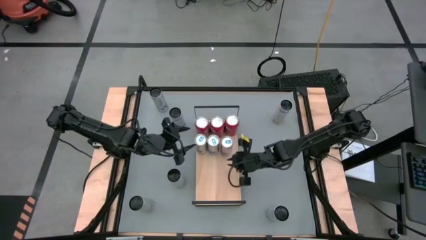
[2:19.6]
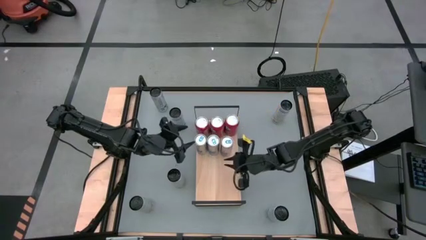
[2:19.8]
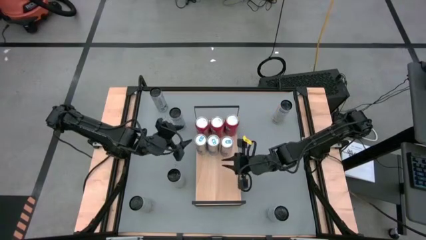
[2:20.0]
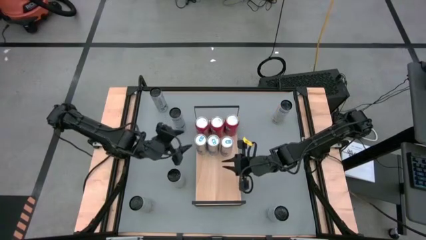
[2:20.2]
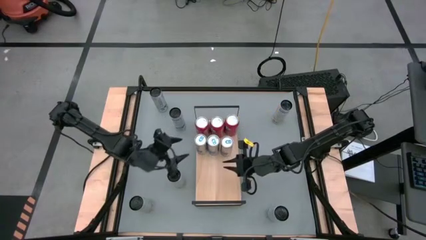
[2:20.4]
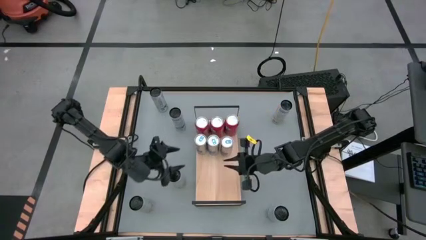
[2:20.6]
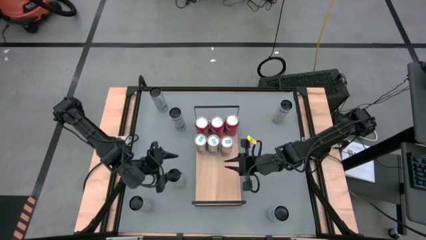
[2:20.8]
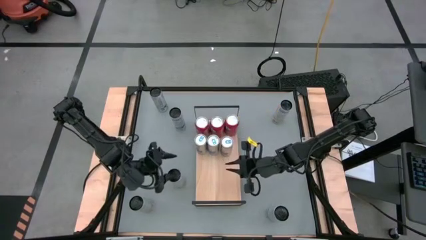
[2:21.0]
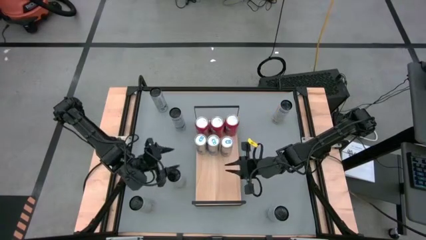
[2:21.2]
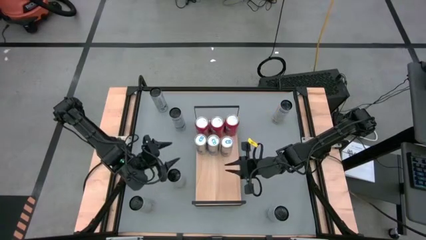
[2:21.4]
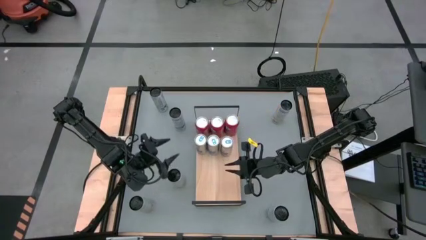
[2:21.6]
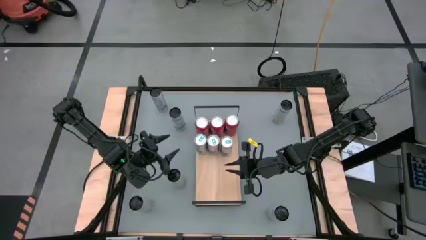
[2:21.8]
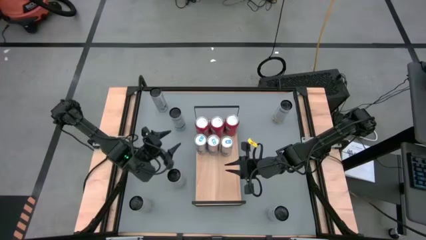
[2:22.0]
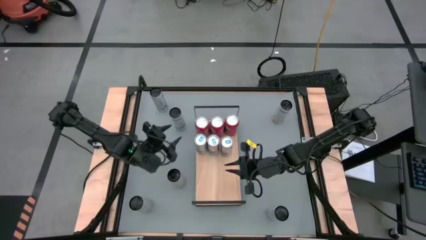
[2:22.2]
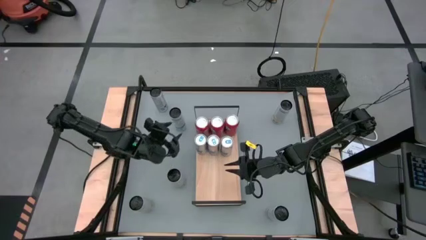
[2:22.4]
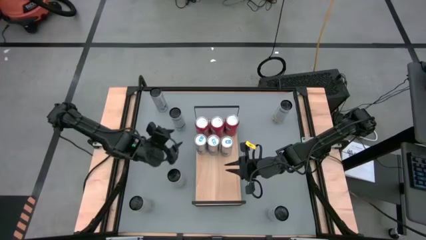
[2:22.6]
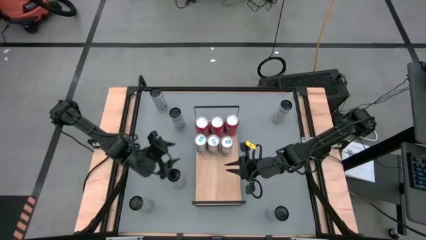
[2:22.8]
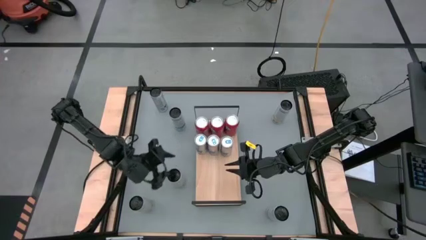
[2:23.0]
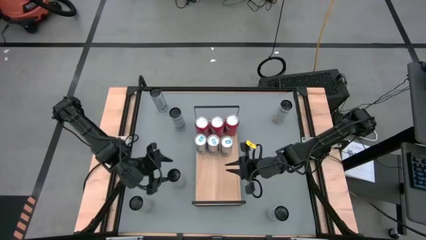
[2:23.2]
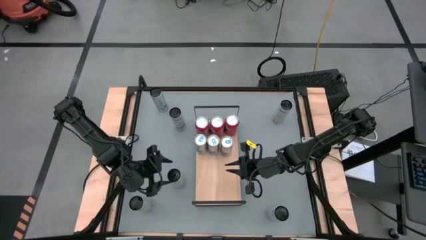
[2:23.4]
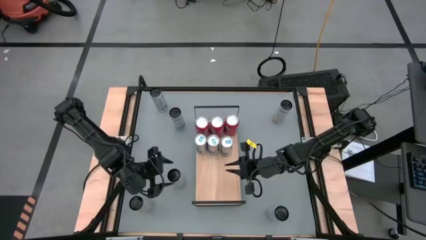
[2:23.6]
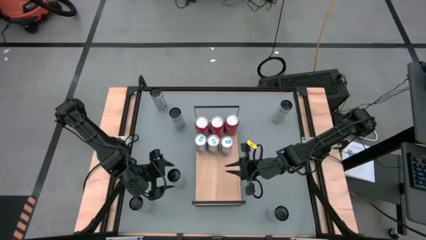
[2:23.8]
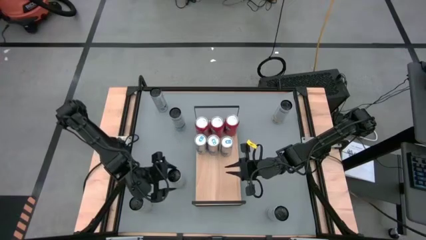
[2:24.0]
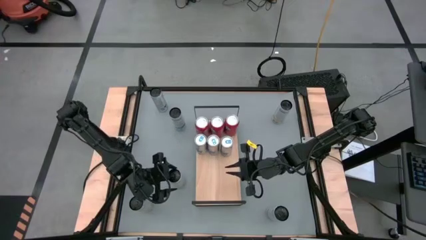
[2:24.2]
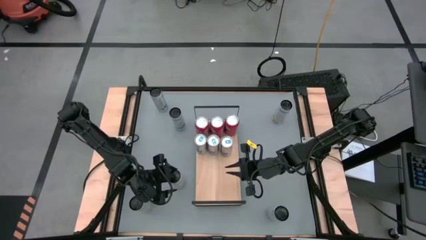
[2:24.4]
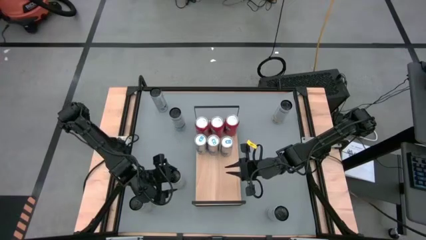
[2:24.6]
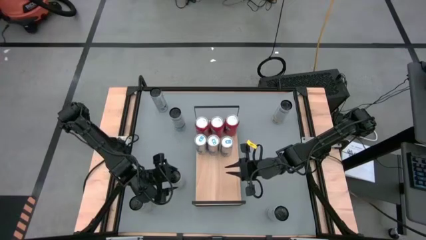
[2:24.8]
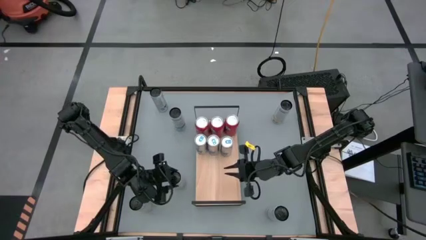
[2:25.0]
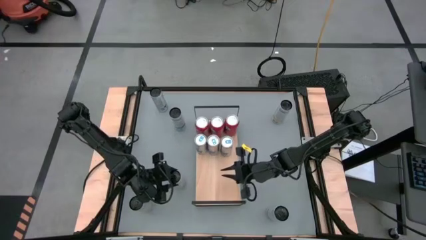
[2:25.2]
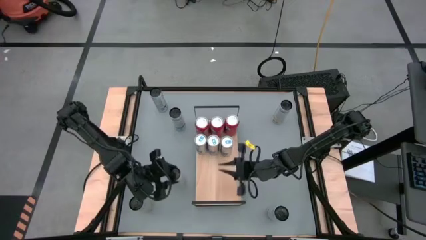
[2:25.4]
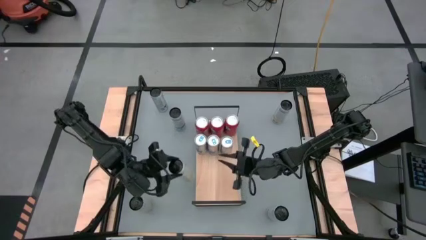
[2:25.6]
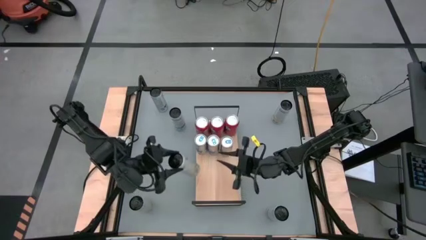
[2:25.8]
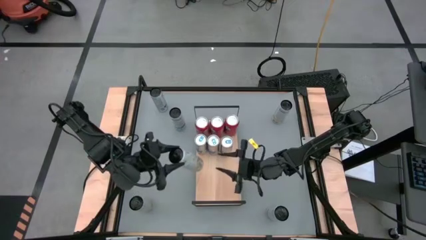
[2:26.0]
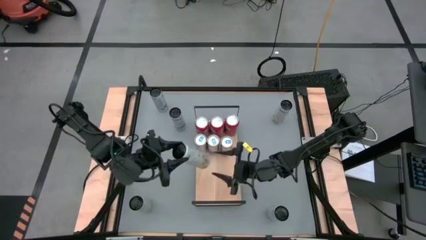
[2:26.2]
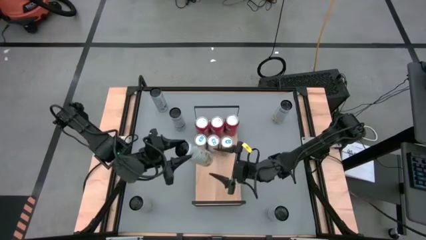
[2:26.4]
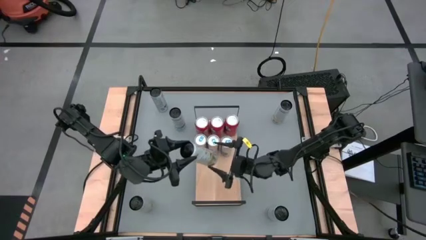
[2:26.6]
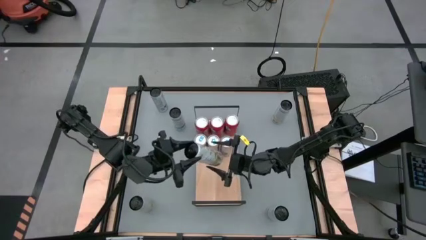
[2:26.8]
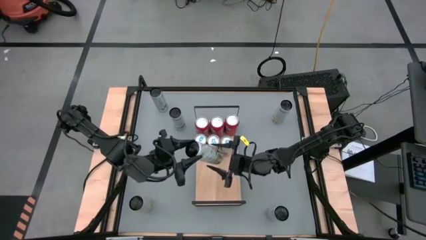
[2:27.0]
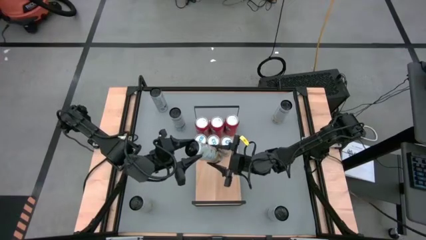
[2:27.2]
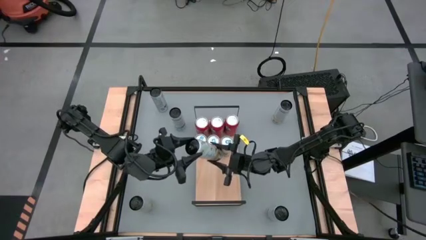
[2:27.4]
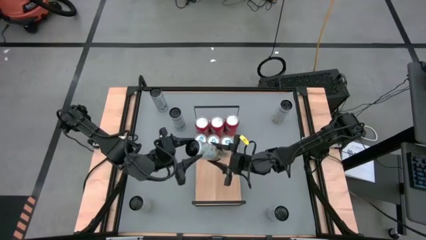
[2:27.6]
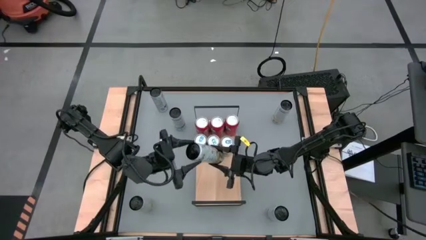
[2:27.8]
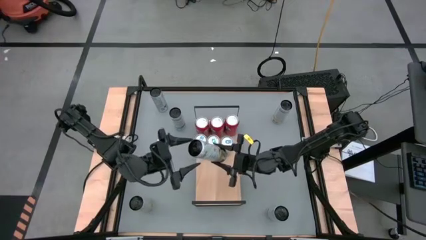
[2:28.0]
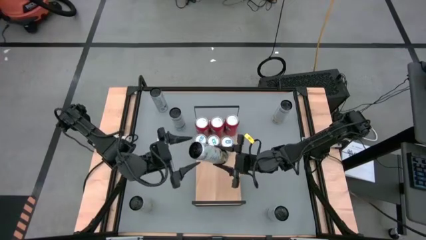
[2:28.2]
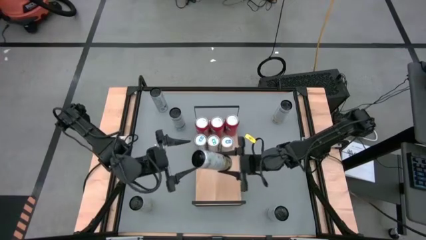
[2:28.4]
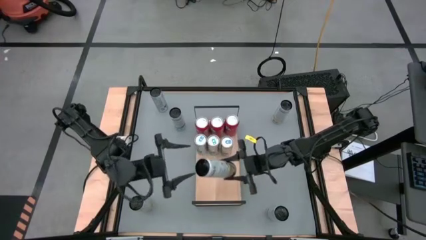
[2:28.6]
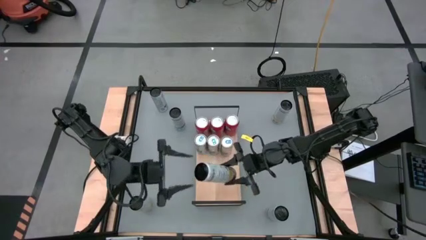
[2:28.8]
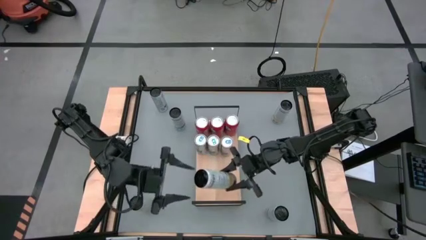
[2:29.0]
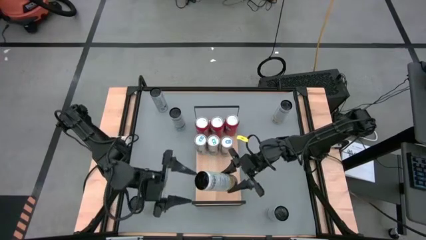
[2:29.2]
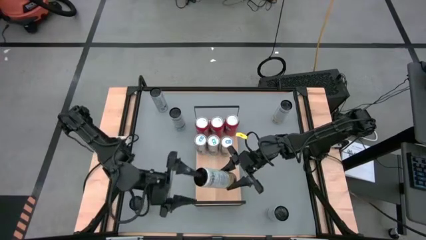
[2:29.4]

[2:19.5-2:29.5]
Task: Place canned beverage on shelf
Put the middle white-yellow soda can on the shelf
